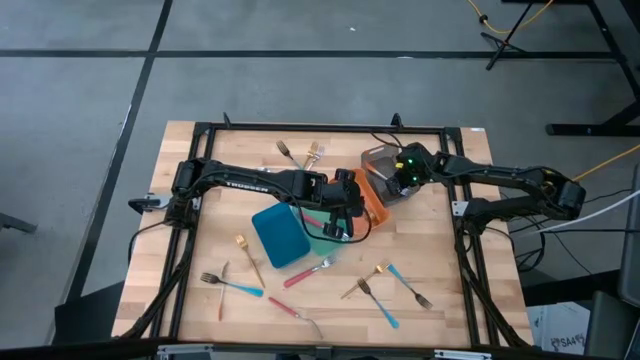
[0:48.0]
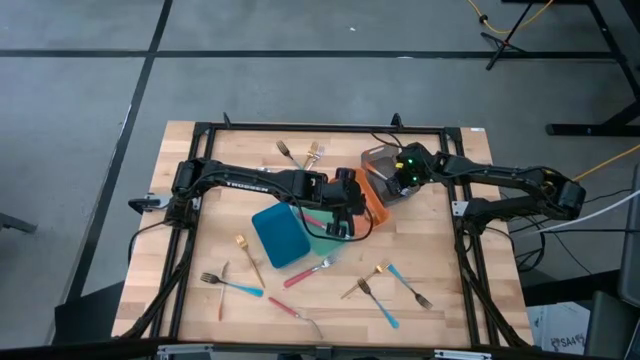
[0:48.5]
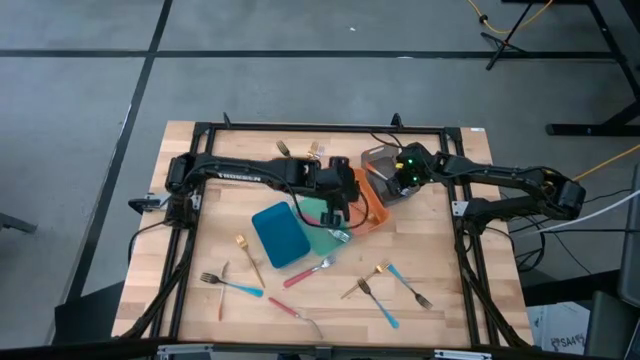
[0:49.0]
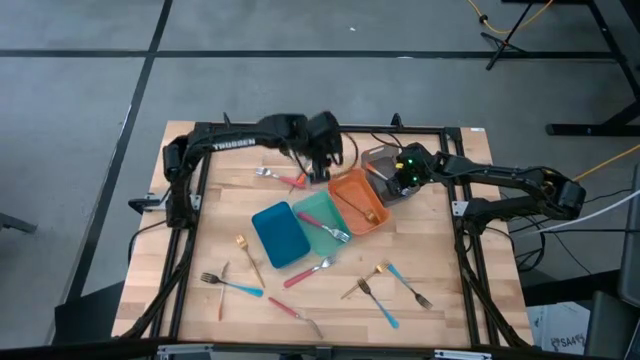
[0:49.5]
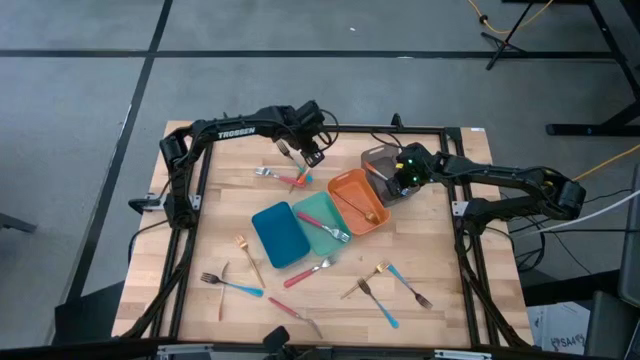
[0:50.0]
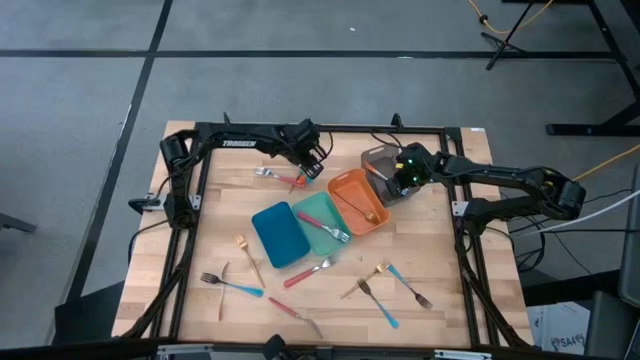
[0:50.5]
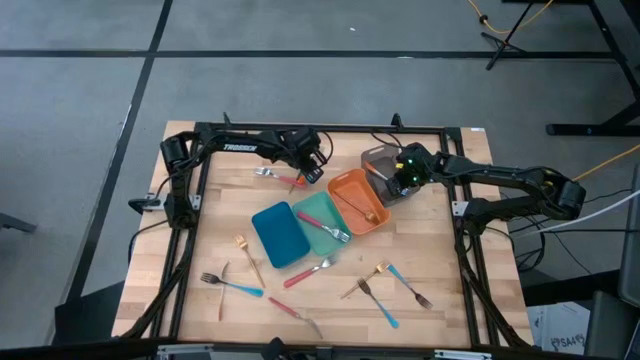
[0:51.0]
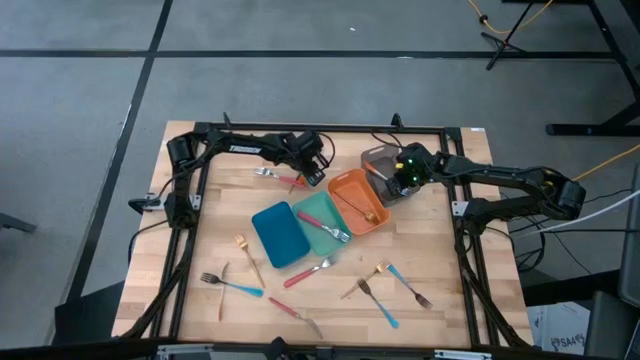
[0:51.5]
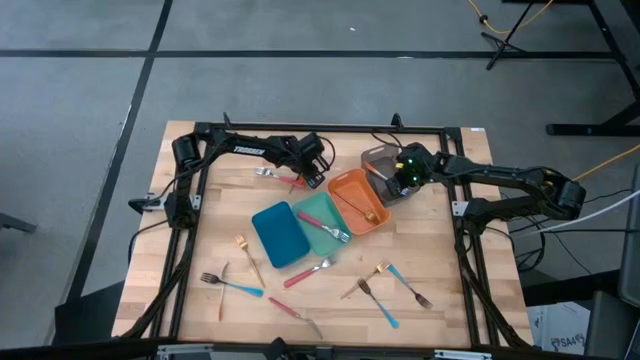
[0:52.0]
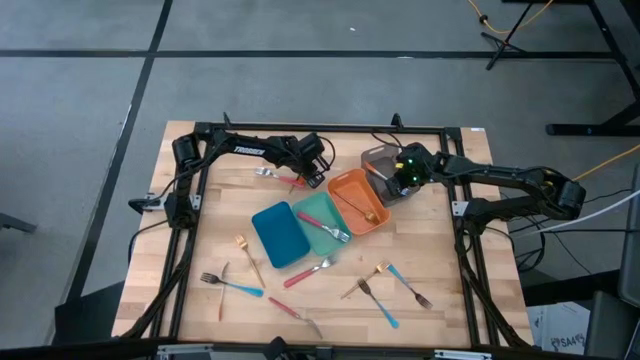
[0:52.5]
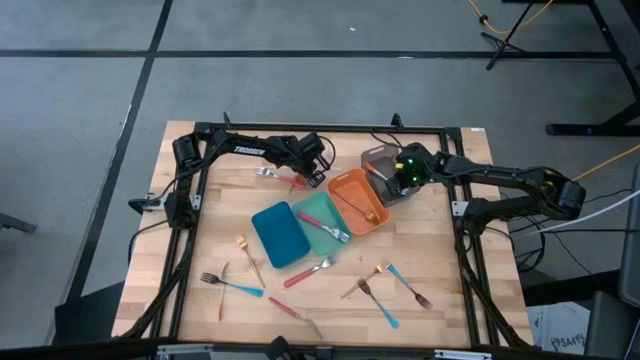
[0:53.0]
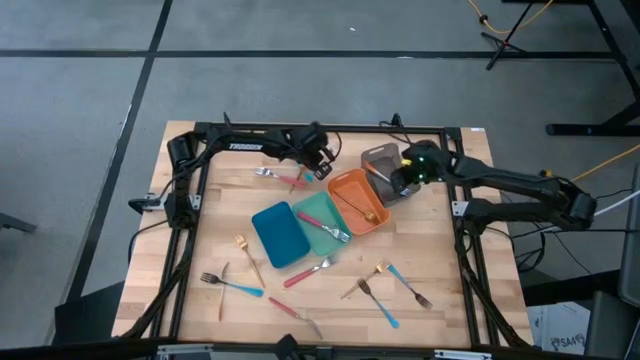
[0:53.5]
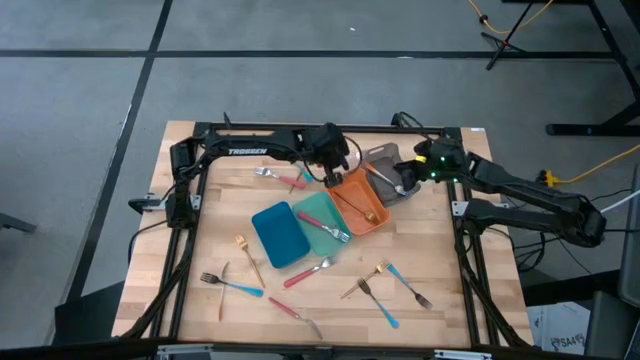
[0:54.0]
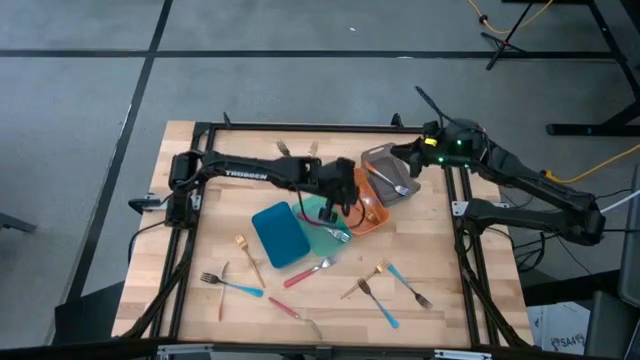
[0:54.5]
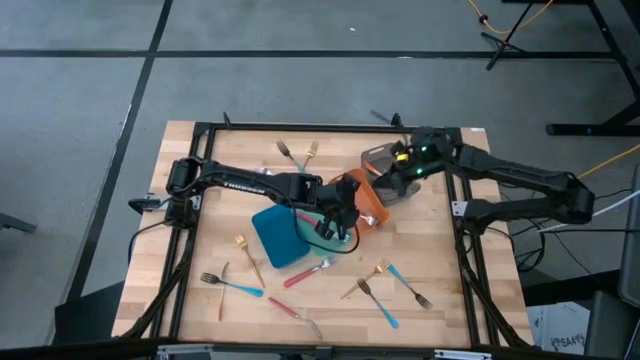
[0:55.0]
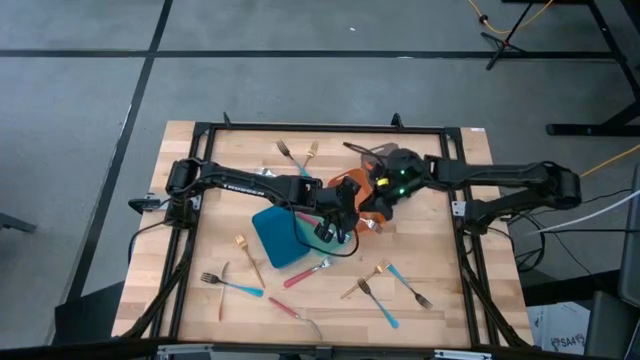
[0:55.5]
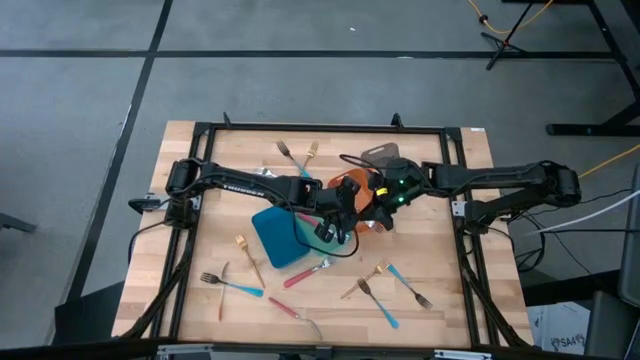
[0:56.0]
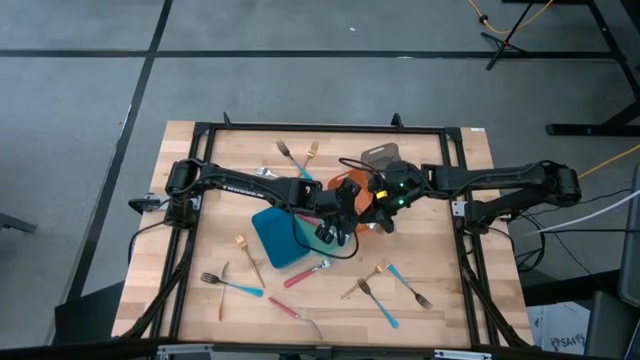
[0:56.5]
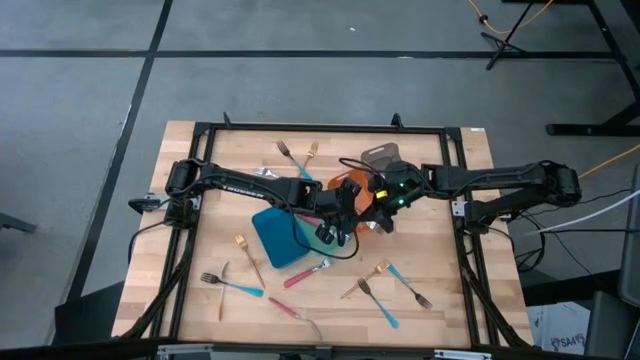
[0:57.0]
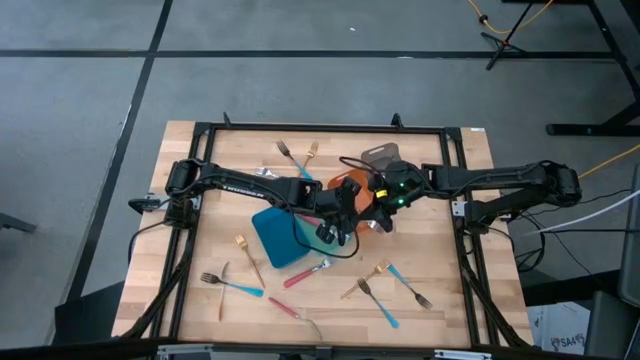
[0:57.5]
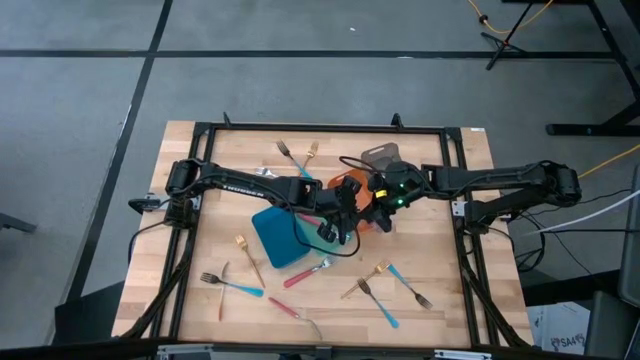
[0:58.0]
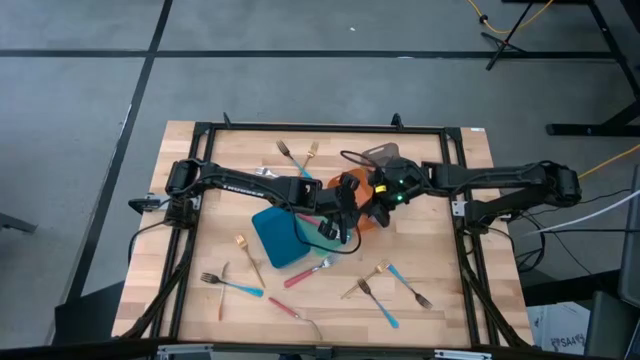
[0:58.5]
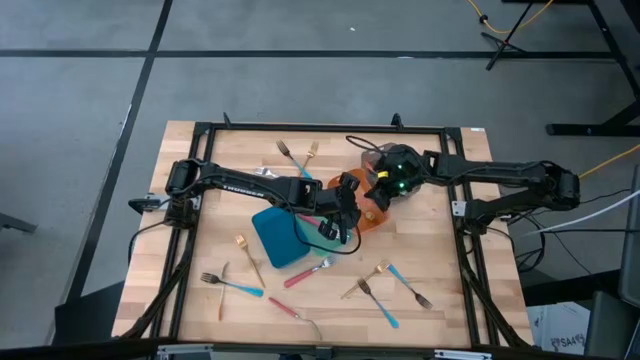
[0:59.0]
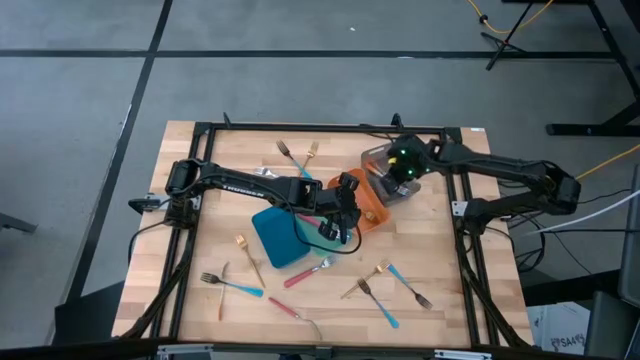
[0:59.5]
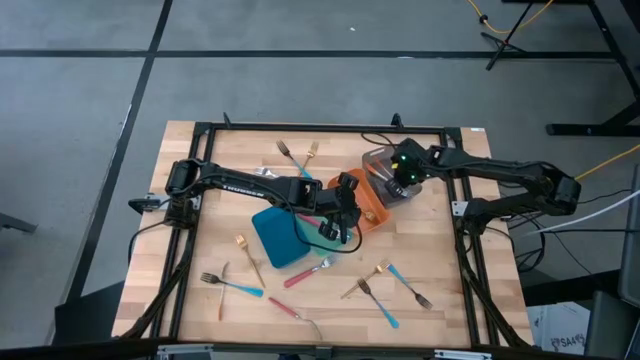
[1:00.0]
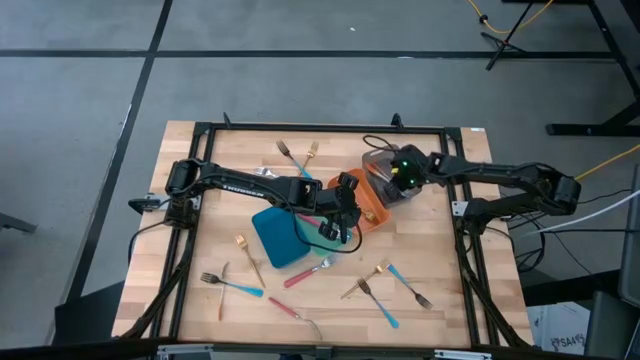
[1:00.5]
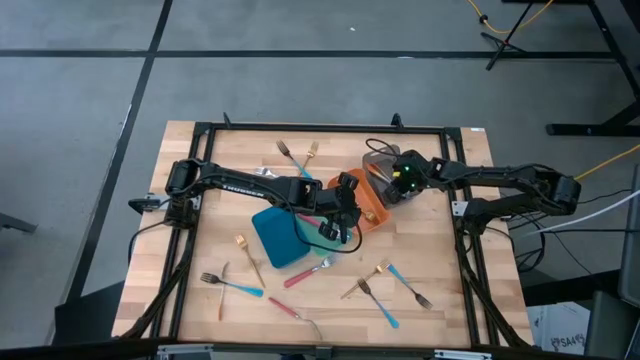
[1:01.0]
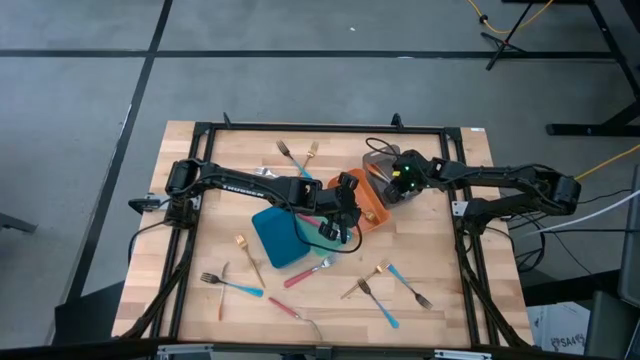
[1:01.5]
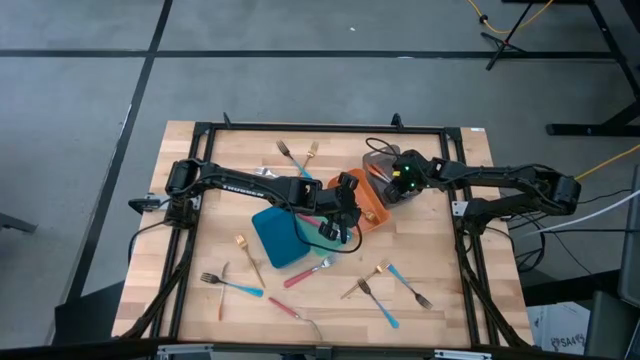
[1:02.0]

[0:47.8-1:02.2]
Task: Sort silverware by color (type)
Put the orange fork into the black bin

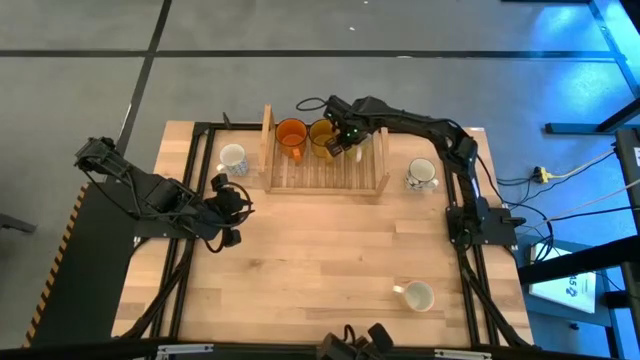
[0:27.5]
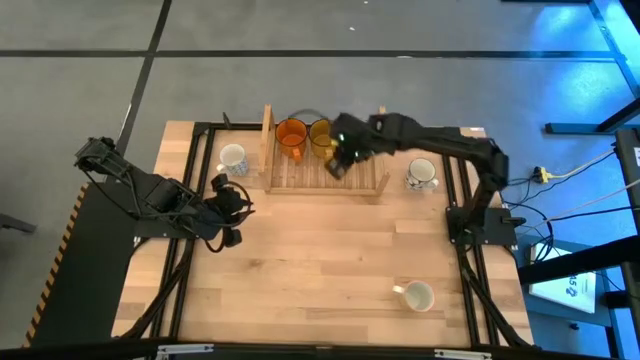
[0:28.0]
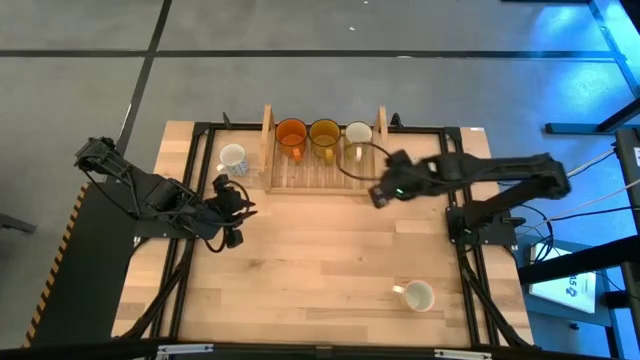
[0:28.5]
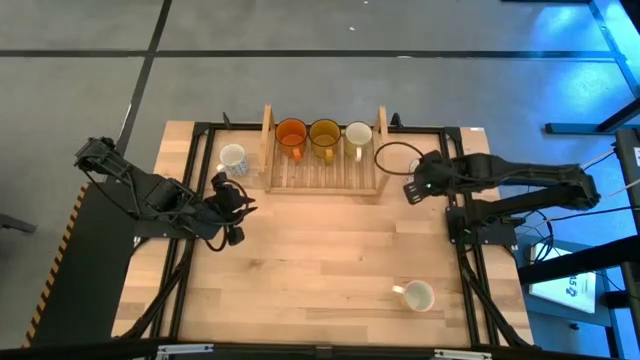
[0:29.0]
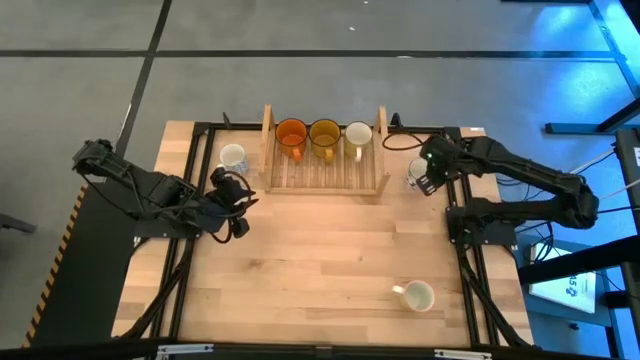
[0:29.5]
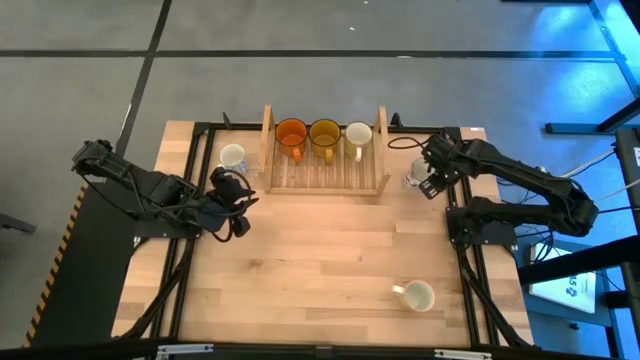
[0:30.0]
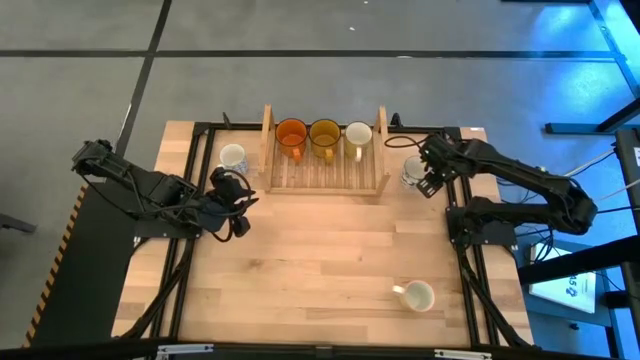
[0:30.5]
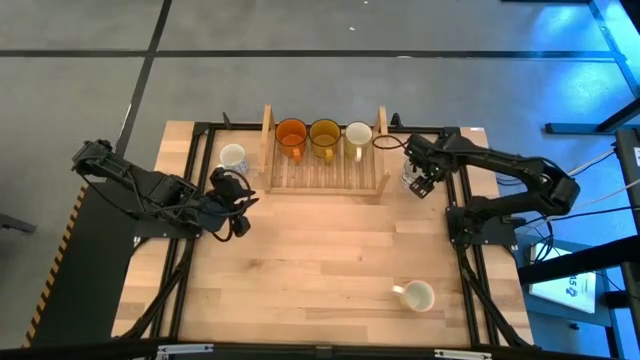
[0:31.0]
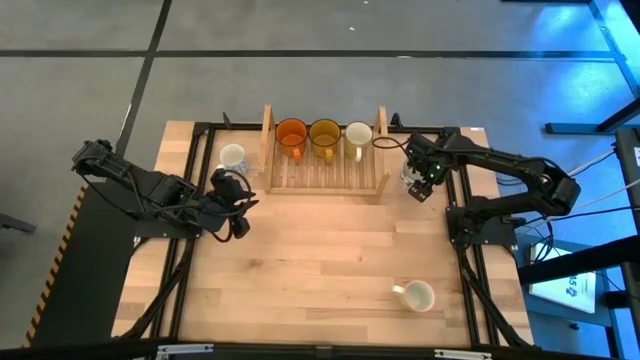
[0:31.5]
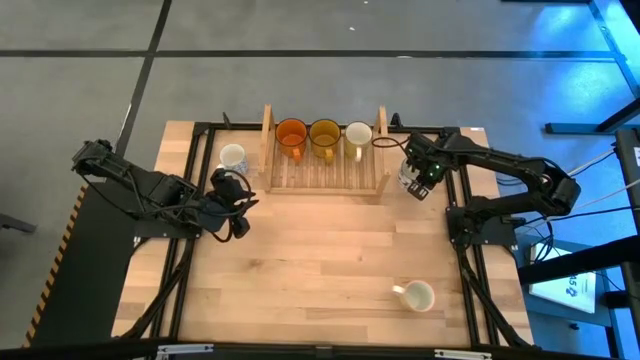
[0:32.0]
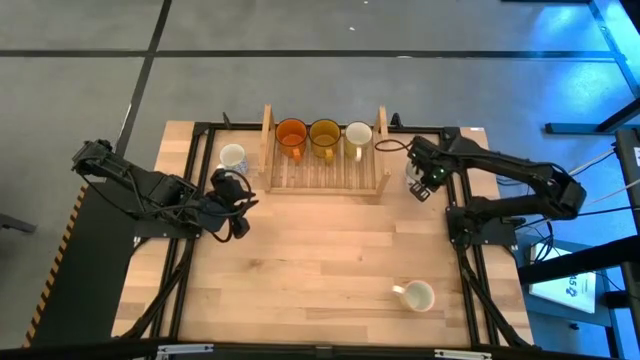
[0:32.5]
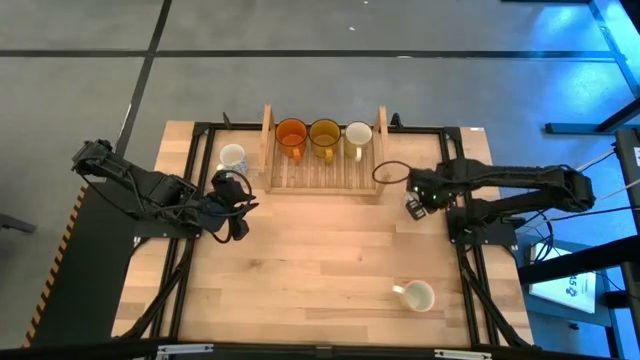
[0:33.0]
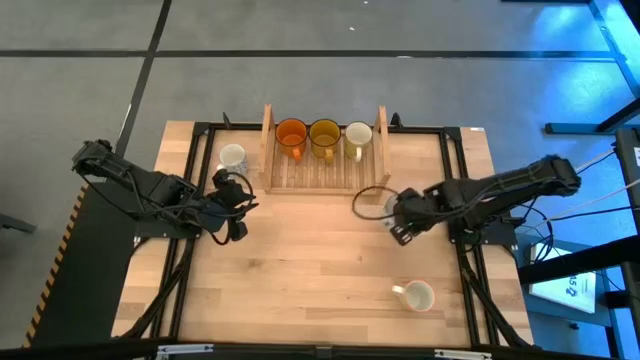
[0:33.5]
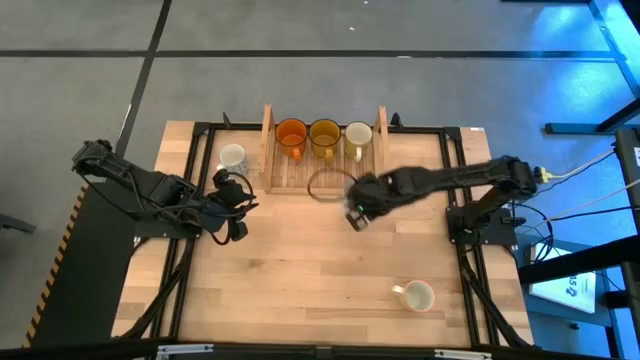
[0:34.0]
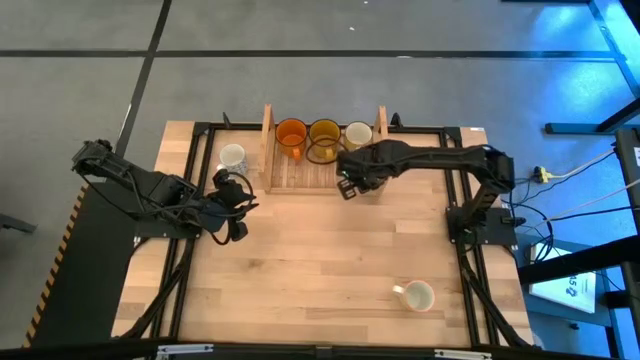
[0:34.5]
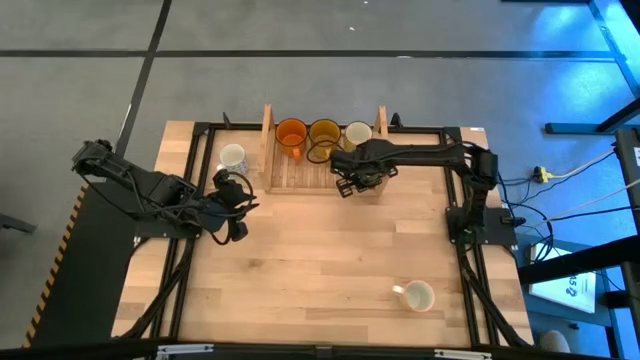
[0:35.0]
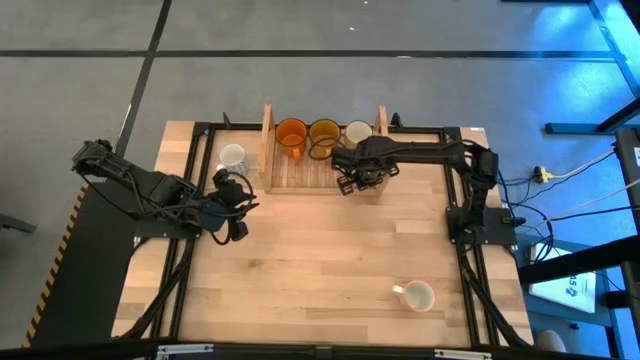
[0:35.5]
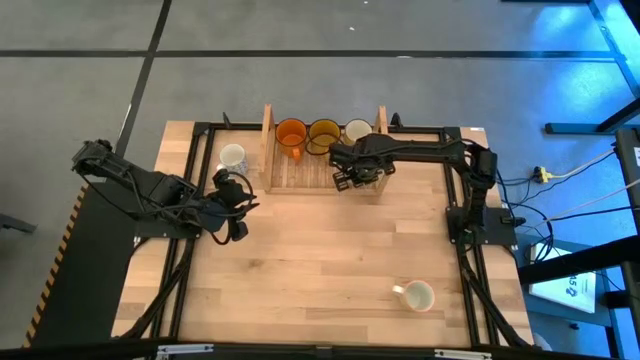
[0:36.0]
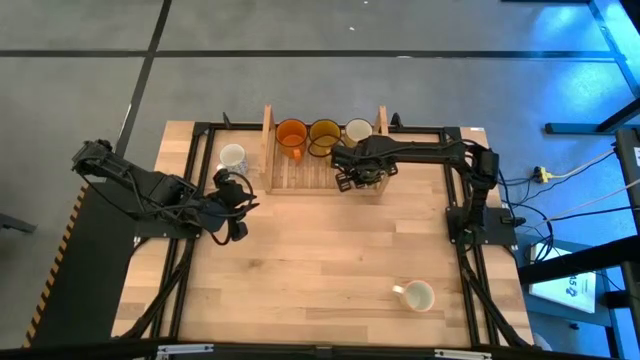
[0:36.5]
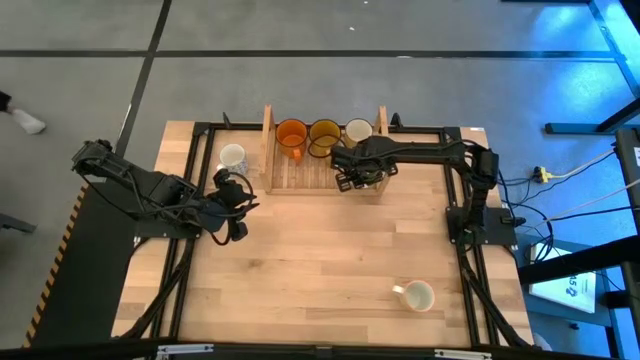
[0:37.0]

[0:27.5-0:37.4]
Task: Place coffee mugs
Put the blue mug on the shelf
